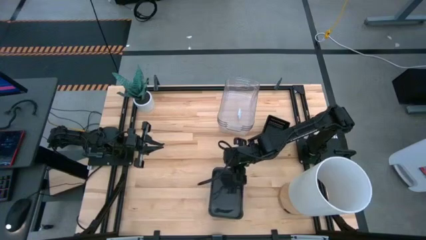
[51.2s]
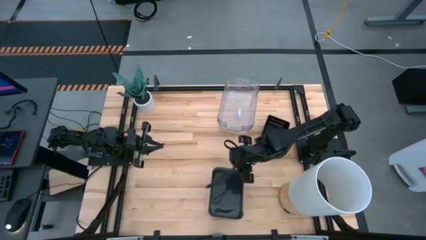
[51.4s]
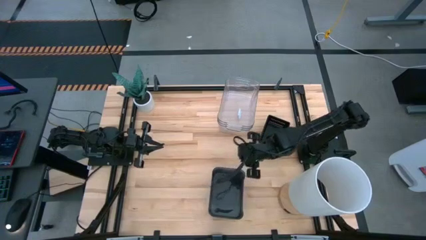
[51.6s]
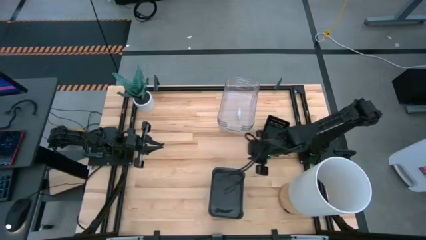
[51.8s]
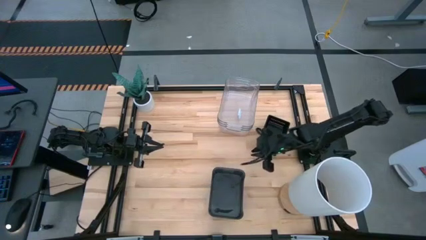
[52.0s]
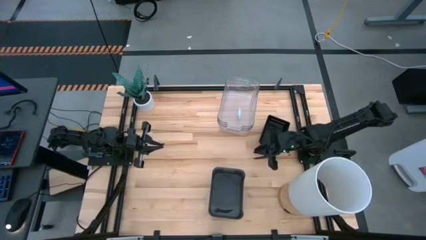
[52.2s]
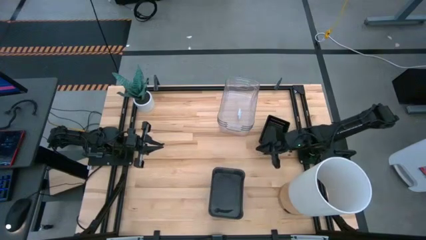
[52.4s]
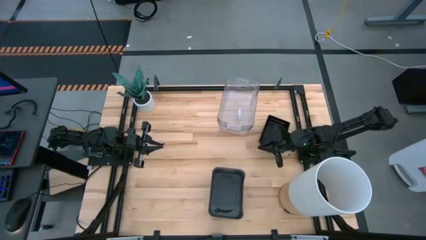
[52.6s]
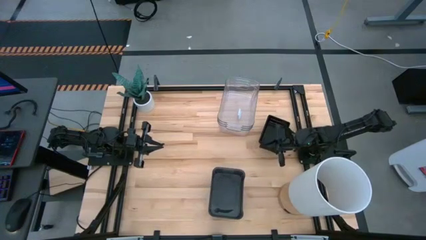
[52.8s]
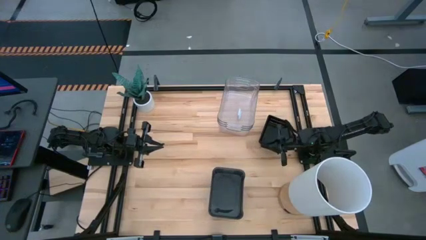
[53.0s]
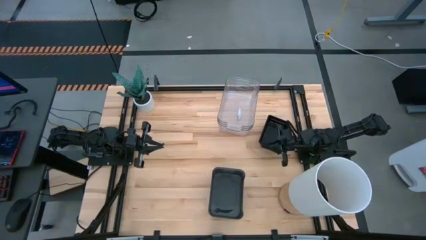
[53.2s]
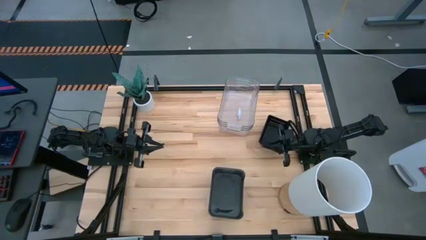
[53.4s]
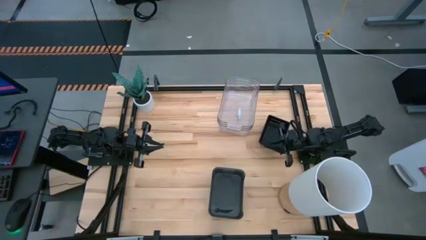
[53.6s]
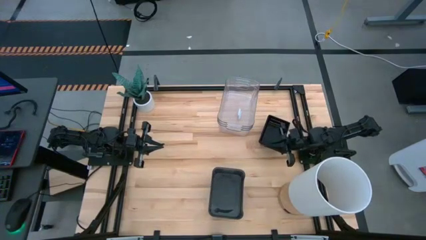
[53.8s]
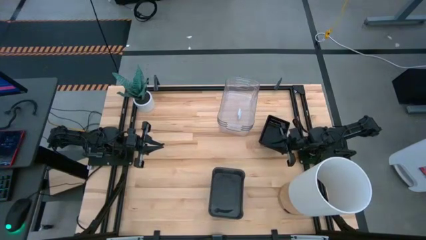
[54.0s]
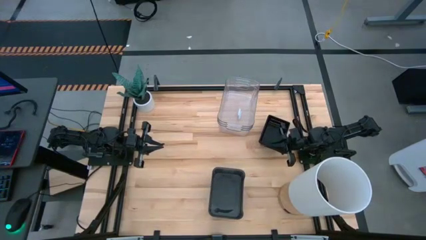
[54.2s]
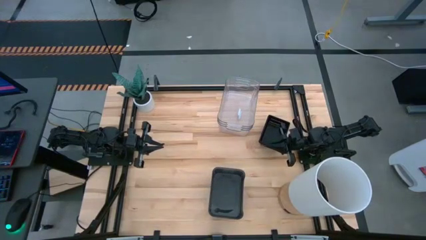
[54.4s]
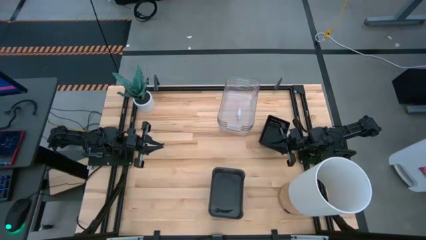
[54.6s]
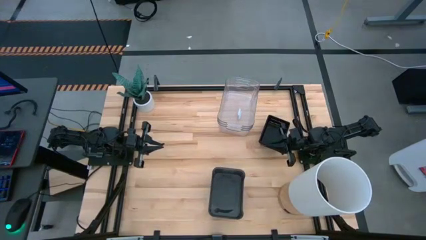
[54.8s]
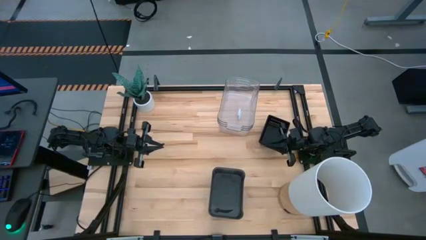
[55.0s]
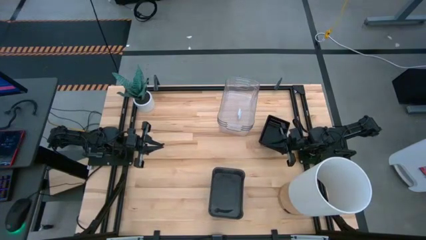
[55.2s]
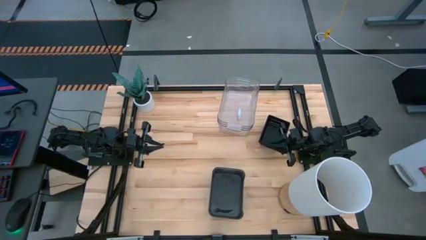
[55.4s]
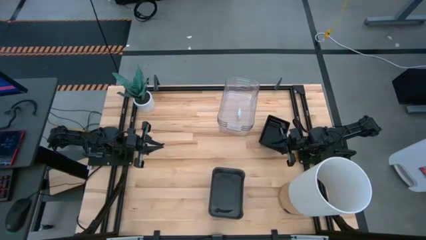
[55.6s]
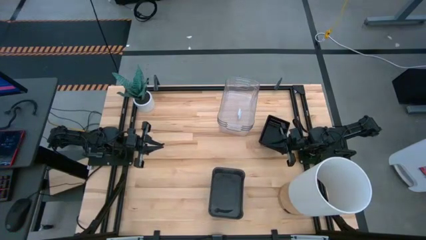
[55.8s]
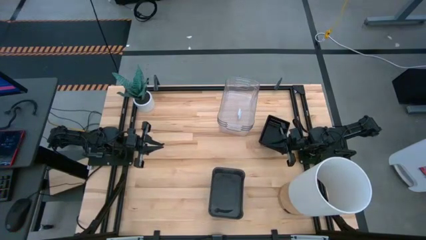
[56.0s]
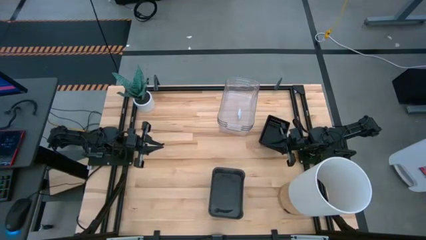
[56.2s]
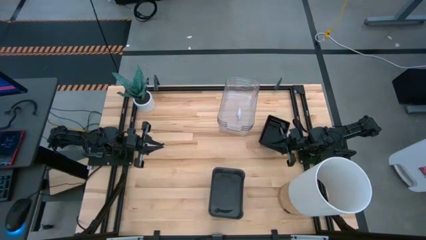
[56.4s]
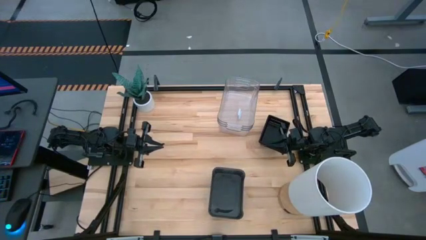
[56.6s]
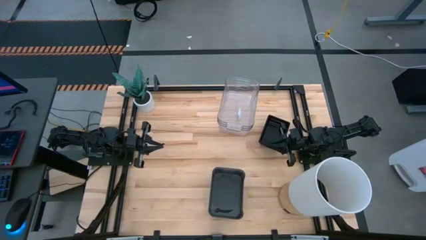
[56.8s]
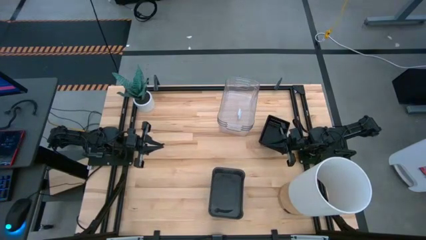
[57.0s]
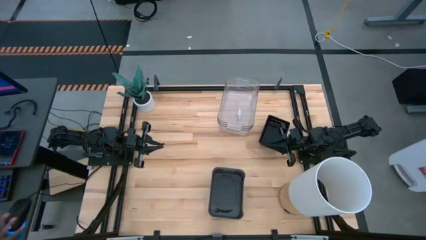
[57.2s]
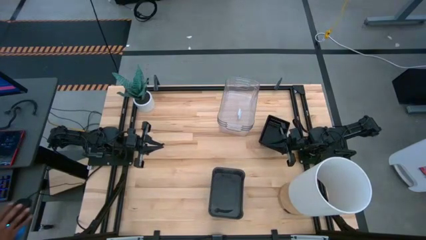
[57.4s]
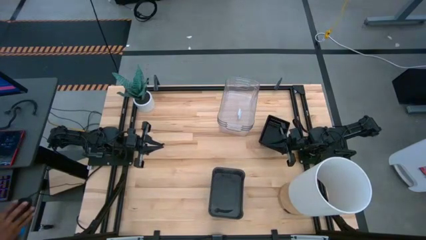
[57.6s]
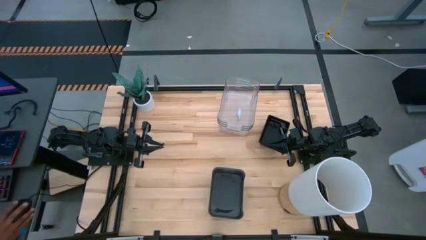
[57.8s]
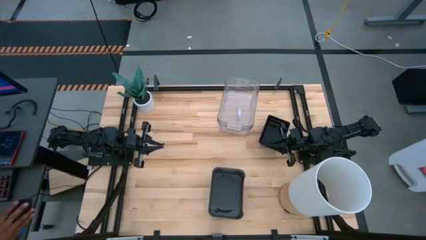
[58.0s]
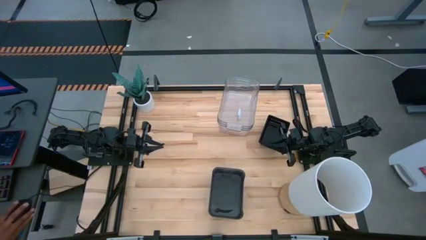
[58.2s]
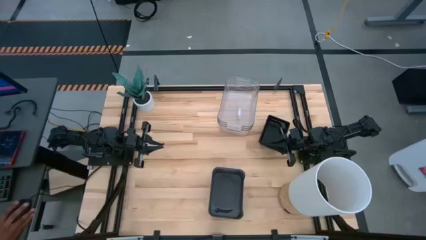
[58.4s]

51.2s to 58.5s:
Return to Home Position

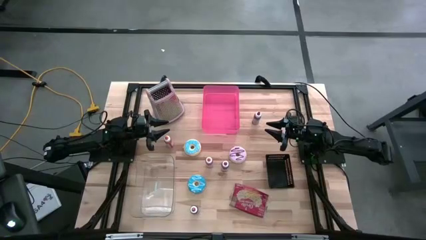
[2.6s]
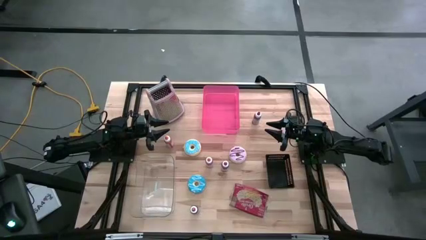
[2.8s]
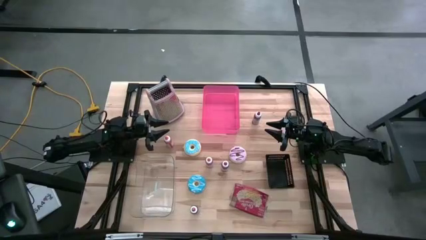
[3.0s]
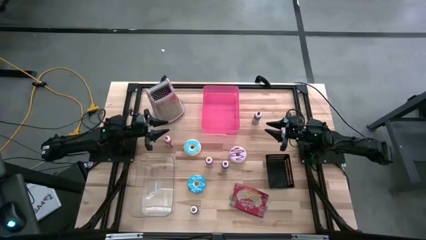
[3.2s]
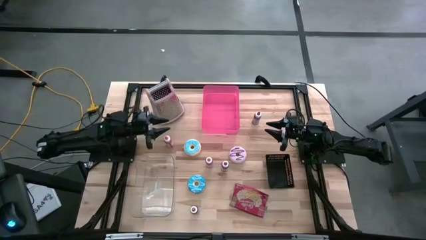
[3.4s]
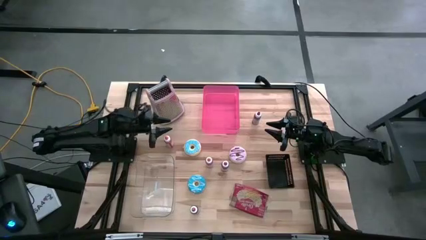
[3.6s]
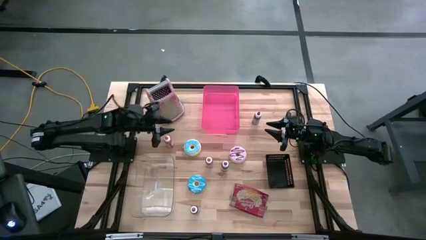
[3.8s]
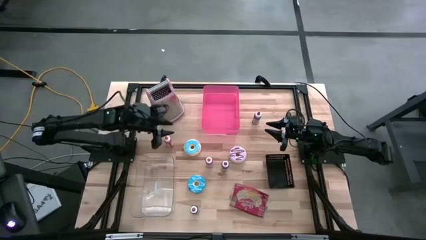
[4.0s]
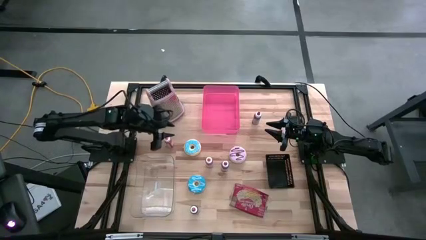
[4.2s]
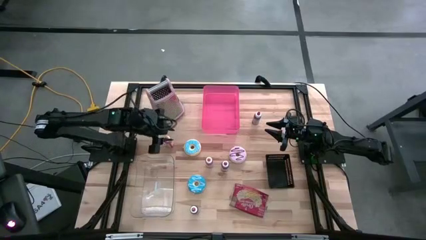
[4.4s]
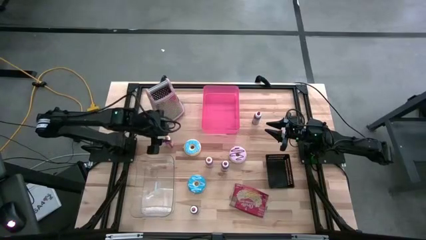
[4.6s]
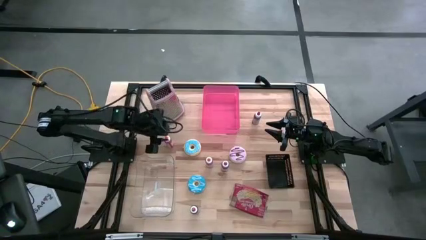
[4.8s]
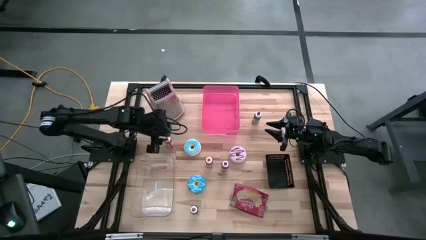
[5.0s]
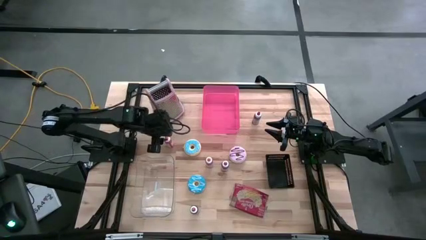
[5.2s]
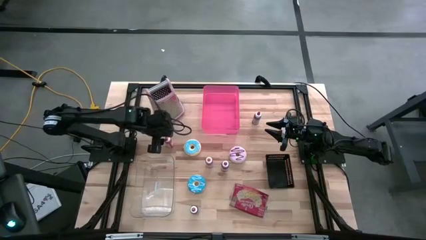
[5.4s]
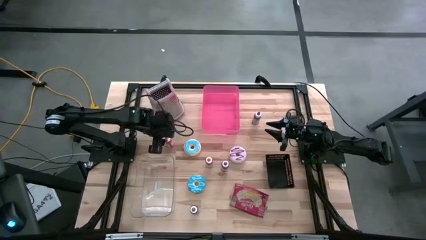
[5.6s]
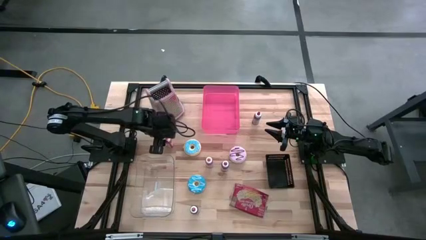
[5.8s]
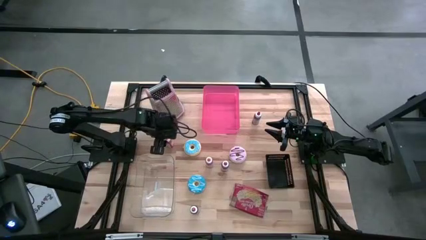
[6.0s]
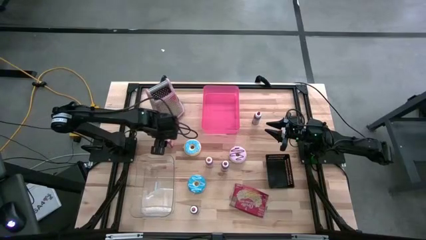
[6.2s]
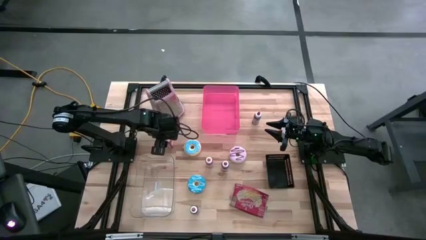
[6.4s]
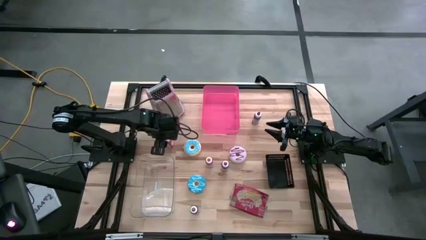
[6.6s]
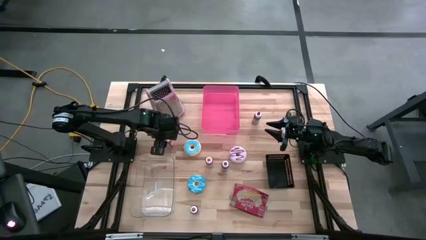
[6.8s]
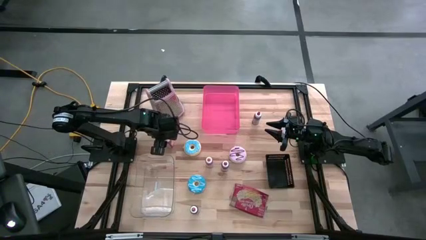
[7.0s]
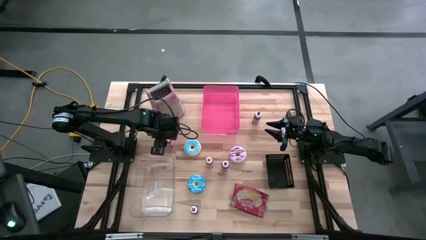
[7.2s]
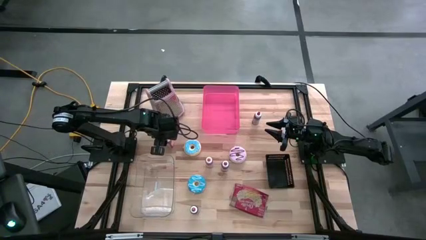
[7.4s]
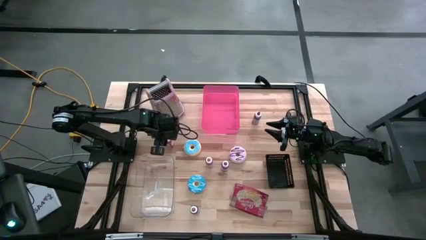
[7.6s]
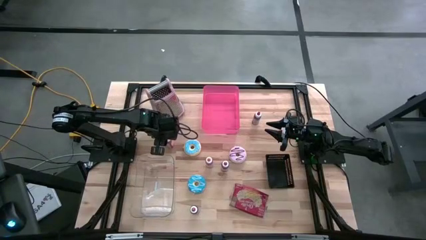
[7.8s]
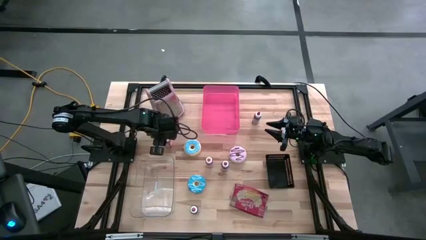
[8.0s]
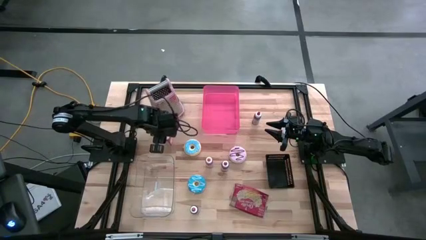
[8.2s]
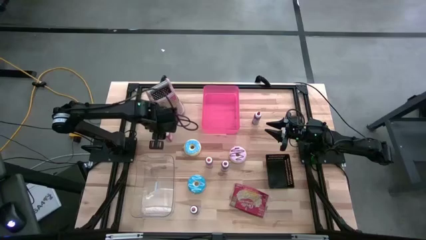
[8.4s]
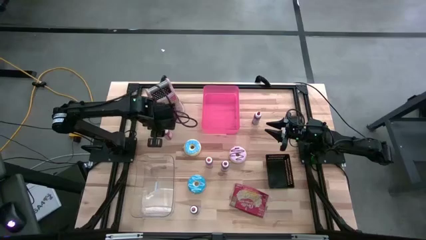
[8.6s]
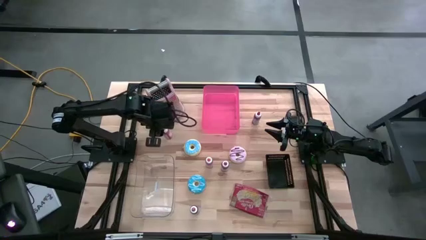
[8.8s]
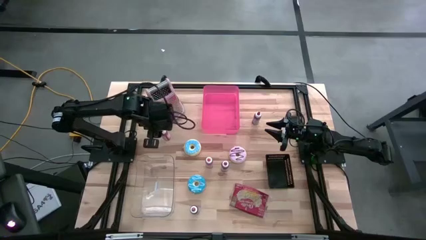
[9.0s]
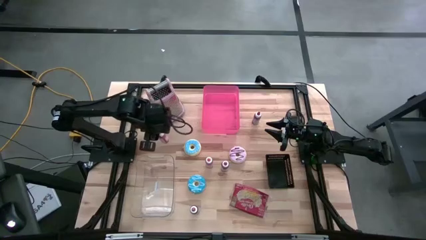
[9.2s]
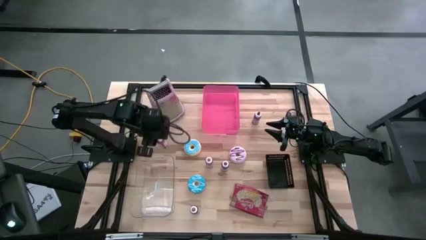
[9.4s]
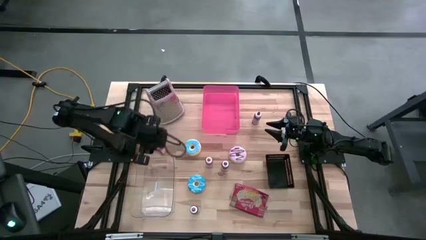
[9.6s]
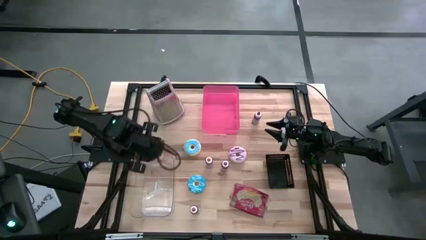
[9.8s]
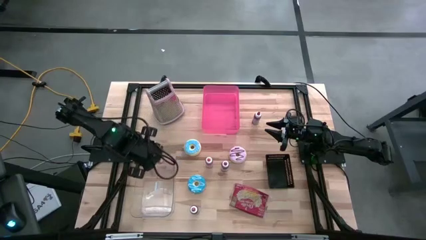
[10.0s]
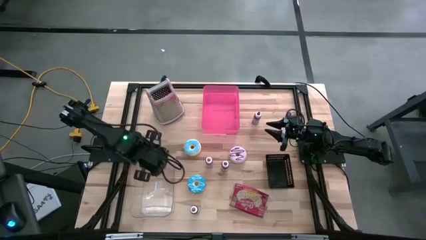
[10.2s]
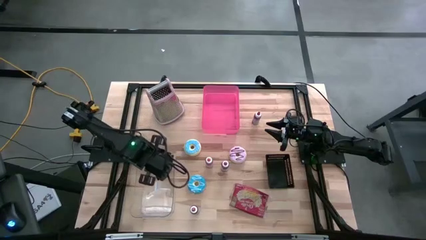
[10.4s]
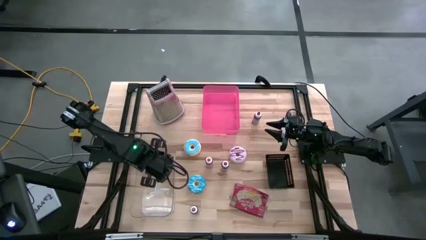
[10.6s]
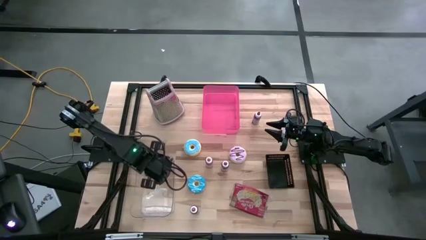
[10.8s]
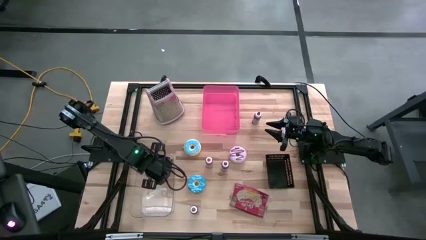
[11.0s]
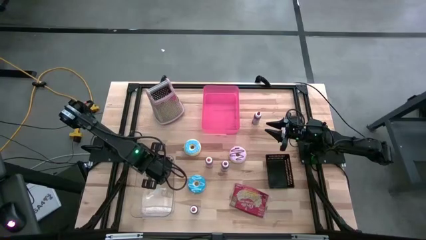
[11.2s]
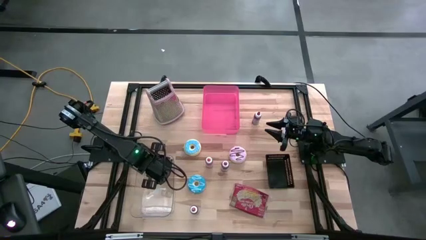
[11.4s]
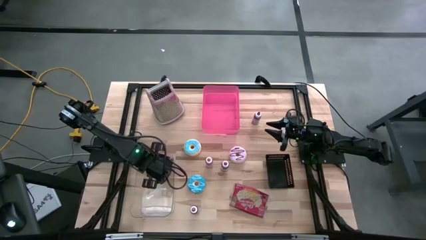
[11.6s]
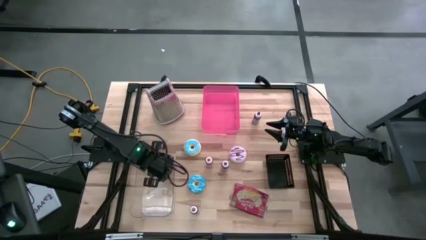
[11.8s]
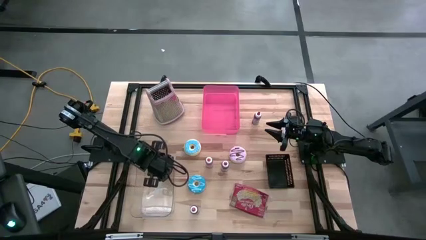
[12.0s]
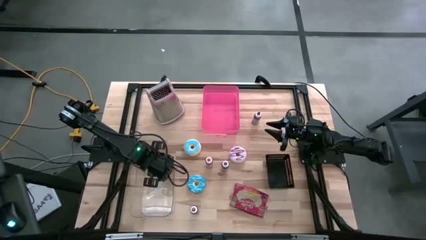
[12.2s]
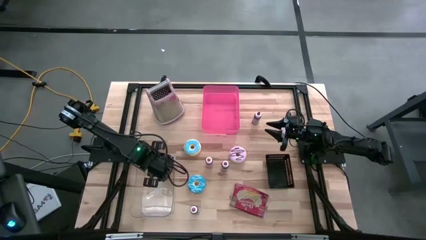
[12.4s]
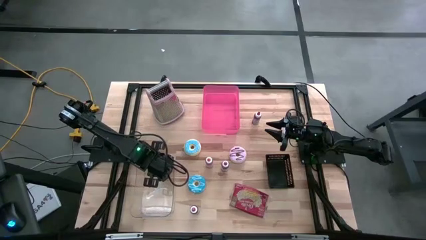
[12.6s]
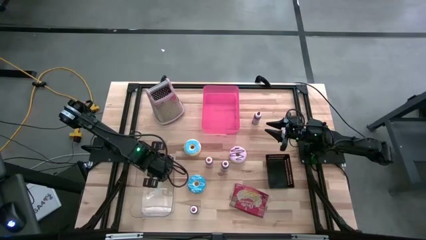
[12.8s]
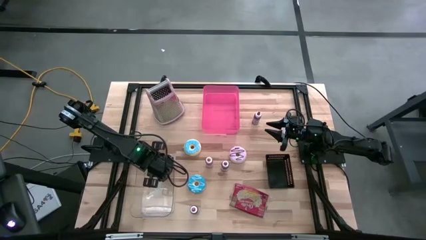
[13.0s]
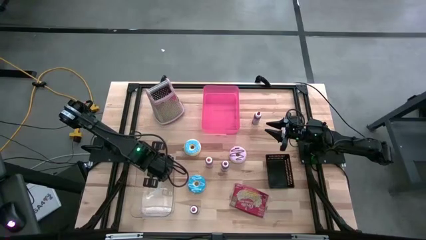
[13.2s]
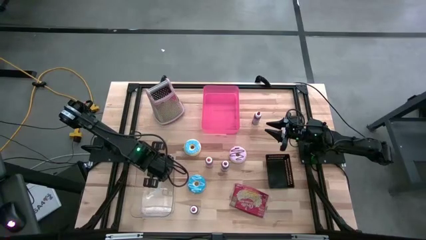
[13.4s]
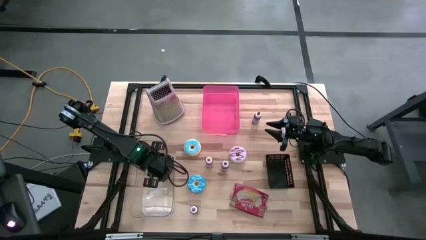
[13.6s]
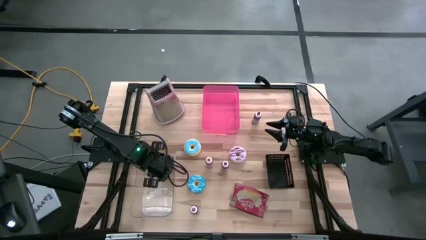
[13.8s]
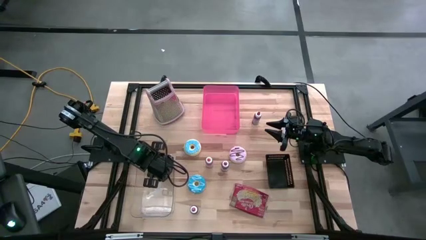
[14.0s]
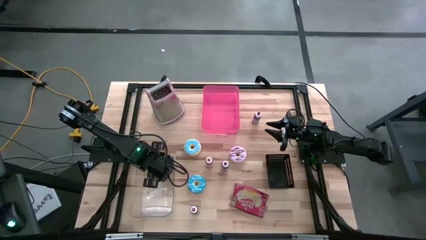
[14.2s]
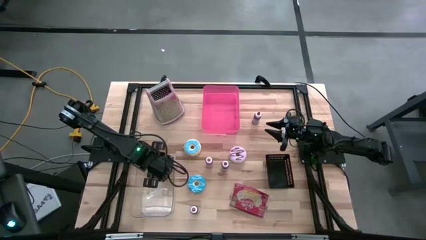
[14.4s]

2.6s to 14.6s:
Put the left orange large food coloring bottle into the transparent bin
